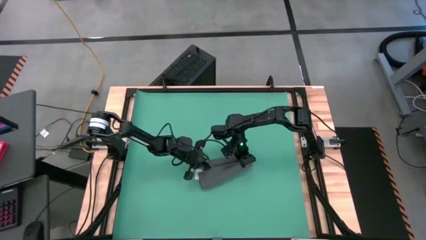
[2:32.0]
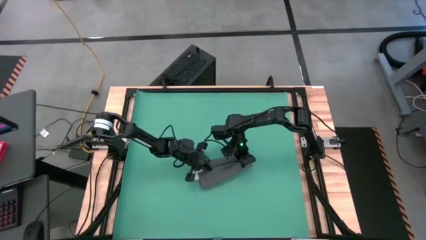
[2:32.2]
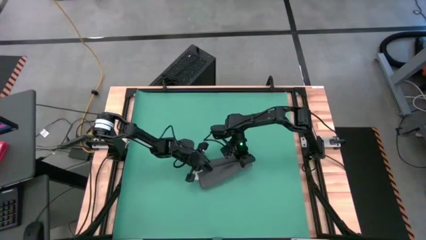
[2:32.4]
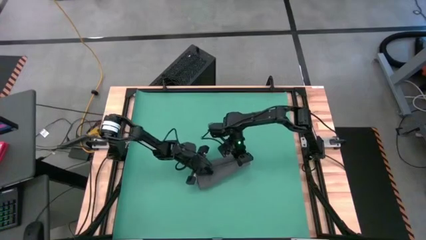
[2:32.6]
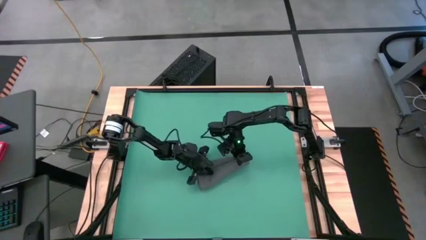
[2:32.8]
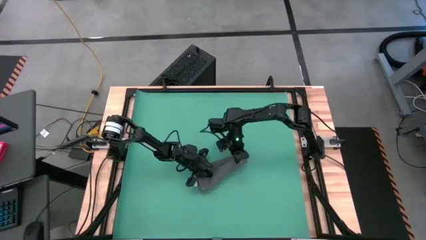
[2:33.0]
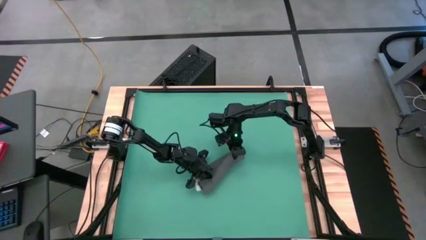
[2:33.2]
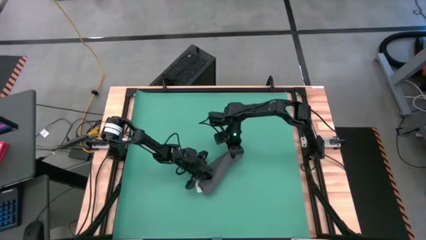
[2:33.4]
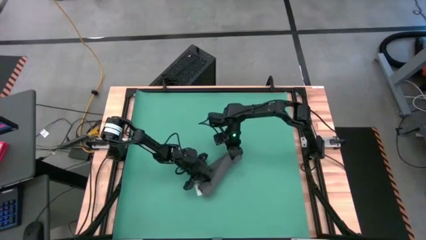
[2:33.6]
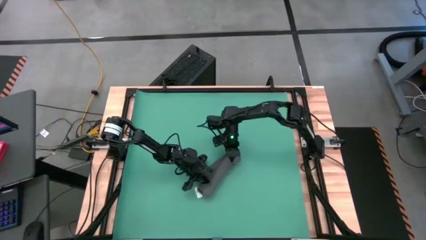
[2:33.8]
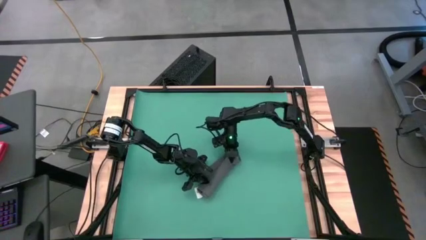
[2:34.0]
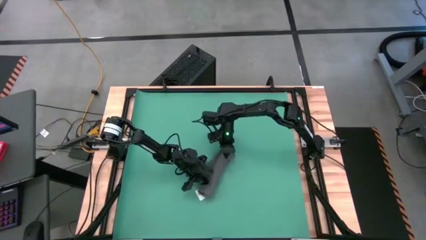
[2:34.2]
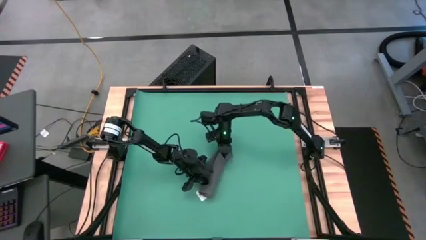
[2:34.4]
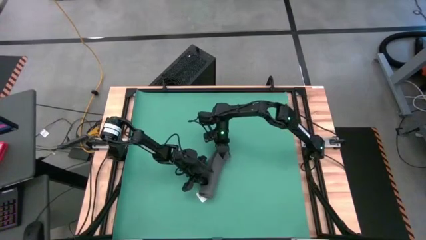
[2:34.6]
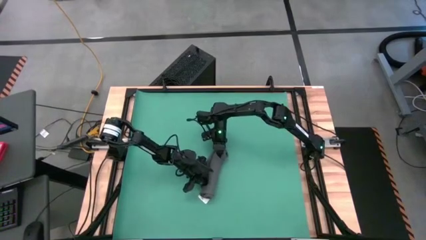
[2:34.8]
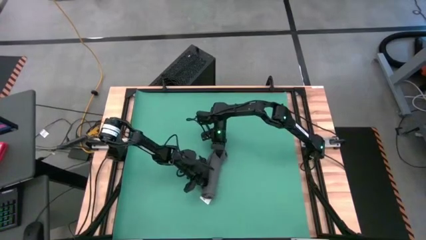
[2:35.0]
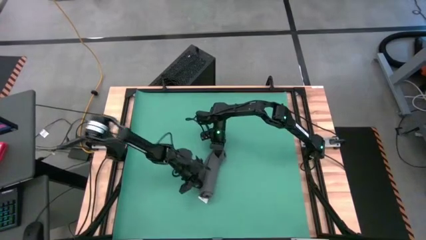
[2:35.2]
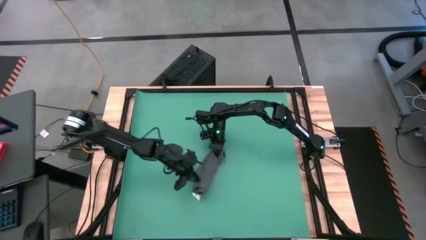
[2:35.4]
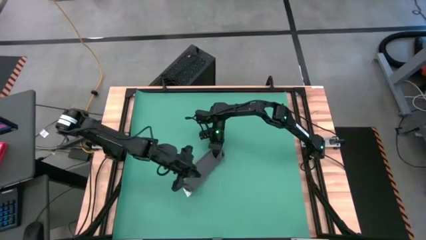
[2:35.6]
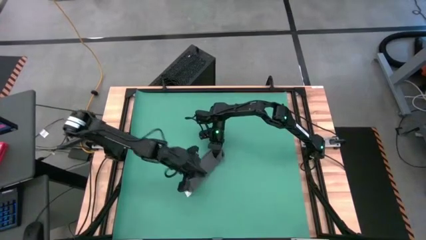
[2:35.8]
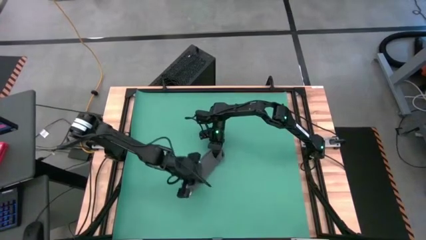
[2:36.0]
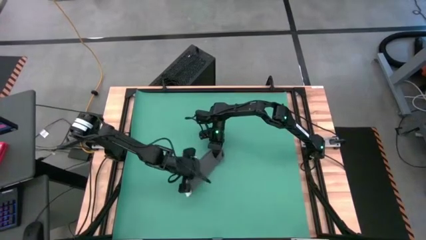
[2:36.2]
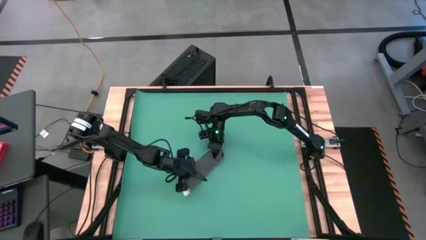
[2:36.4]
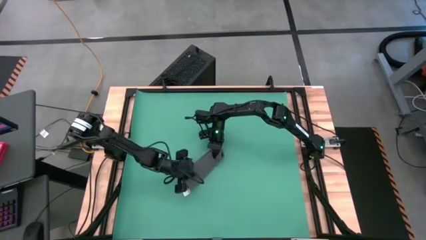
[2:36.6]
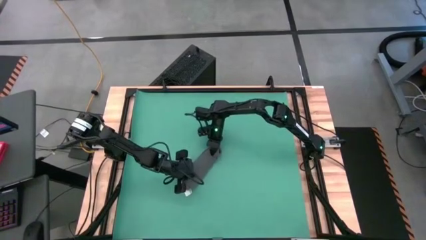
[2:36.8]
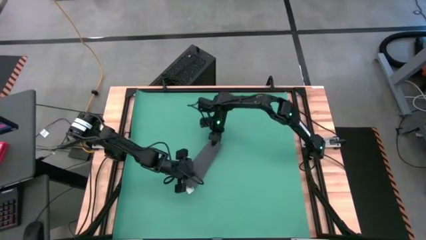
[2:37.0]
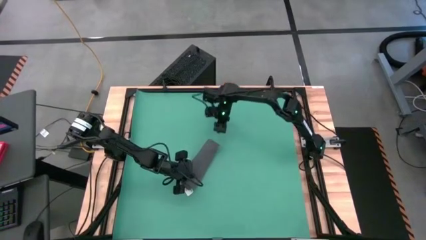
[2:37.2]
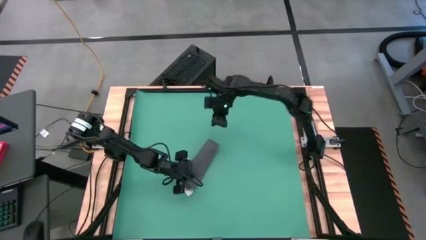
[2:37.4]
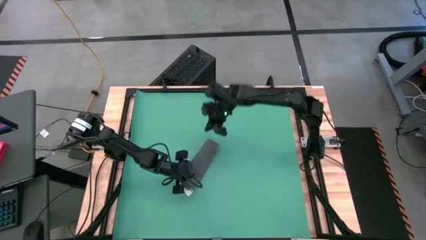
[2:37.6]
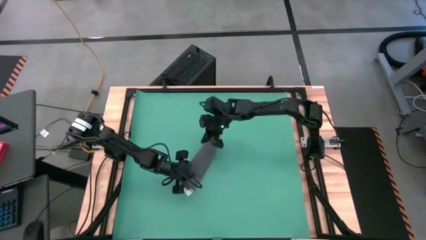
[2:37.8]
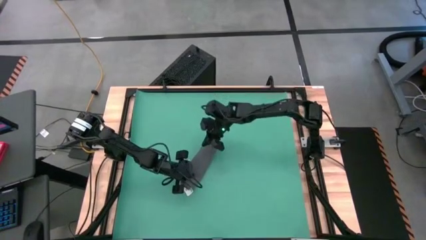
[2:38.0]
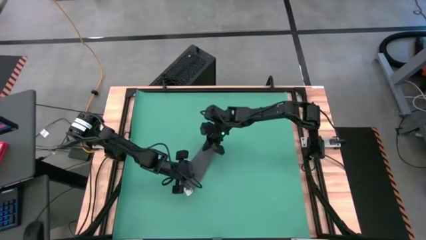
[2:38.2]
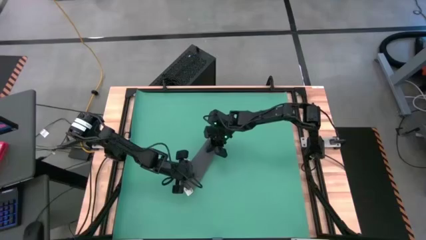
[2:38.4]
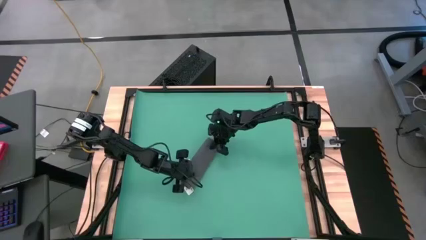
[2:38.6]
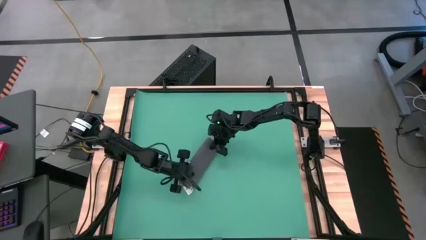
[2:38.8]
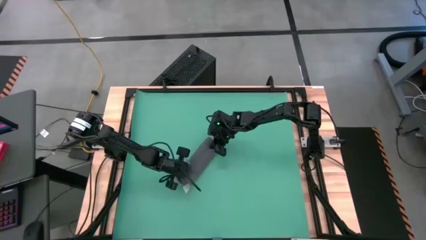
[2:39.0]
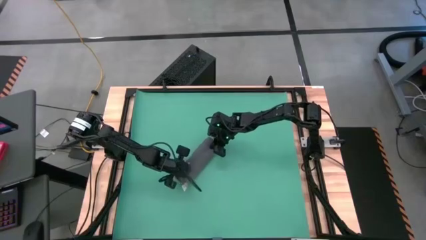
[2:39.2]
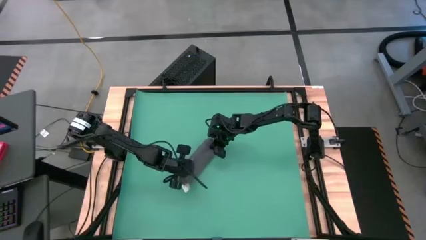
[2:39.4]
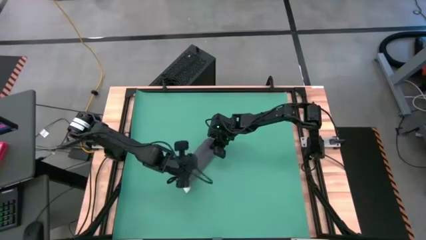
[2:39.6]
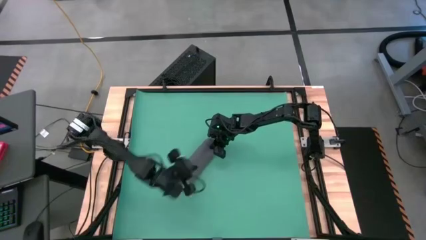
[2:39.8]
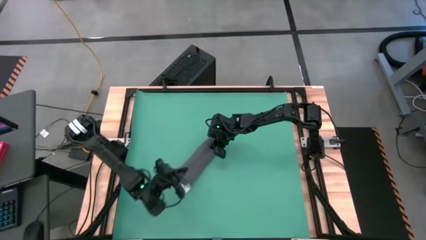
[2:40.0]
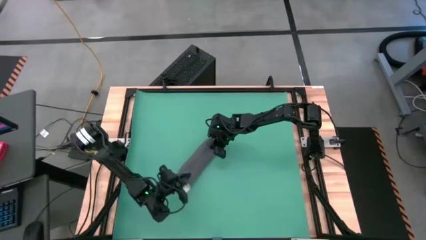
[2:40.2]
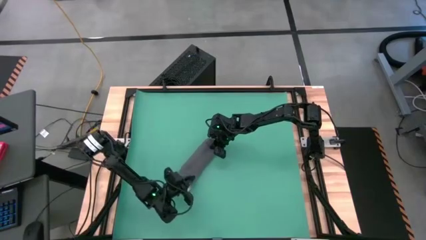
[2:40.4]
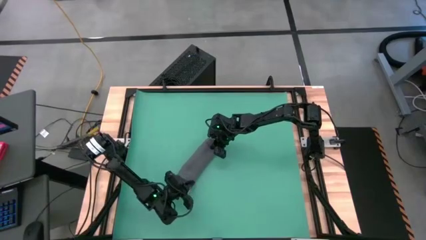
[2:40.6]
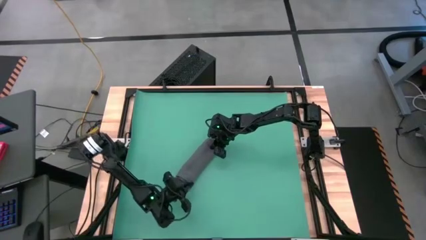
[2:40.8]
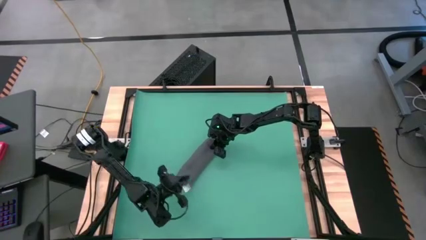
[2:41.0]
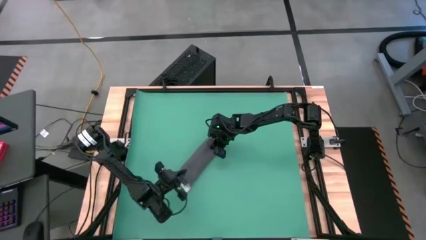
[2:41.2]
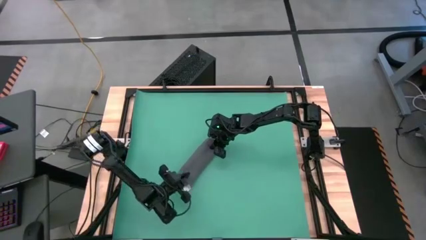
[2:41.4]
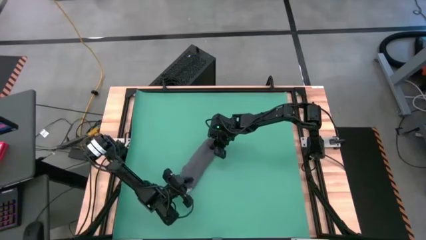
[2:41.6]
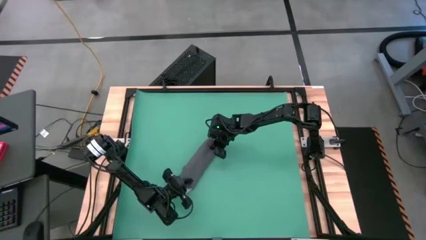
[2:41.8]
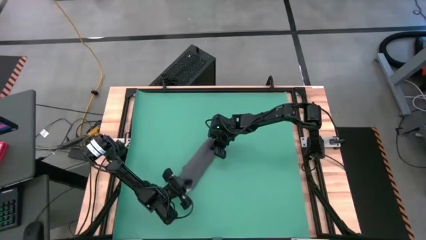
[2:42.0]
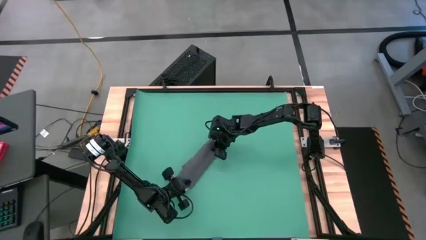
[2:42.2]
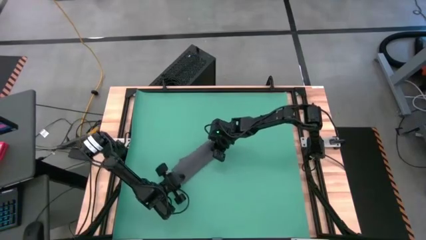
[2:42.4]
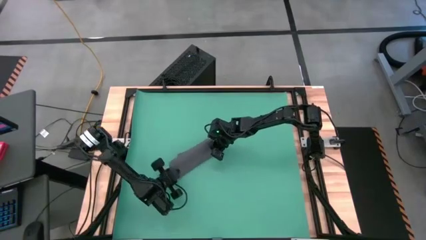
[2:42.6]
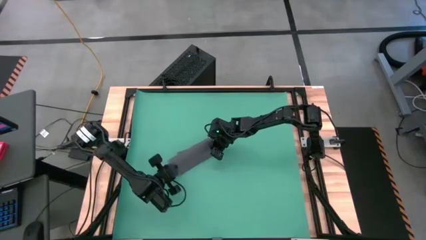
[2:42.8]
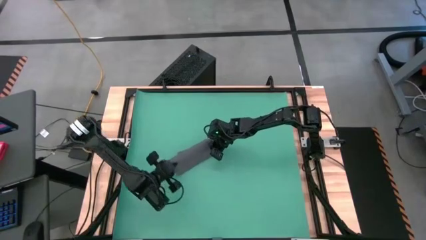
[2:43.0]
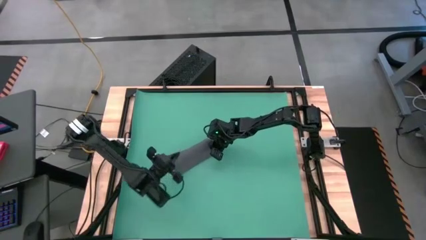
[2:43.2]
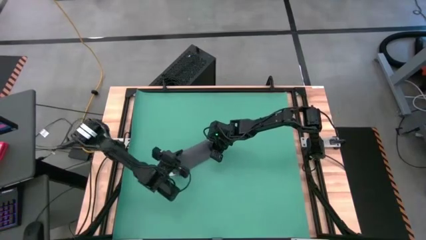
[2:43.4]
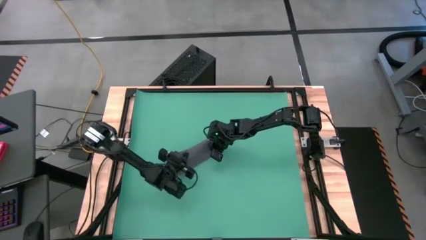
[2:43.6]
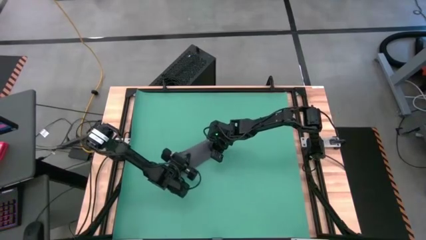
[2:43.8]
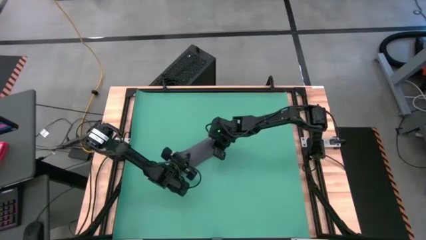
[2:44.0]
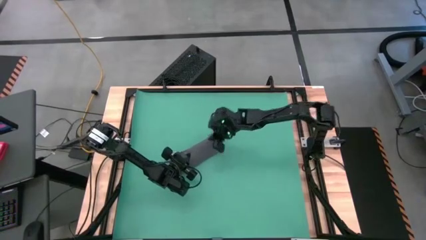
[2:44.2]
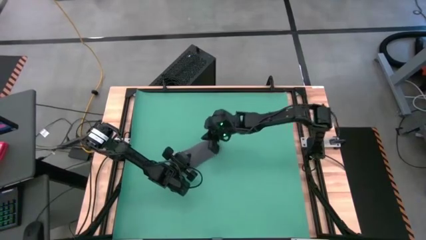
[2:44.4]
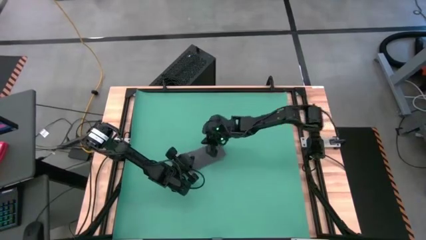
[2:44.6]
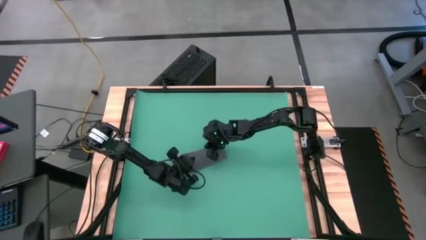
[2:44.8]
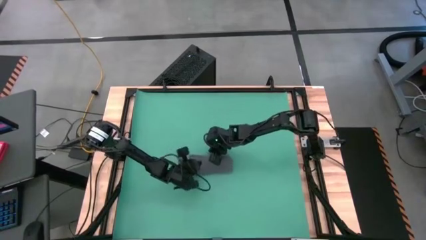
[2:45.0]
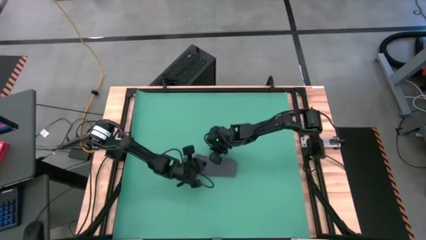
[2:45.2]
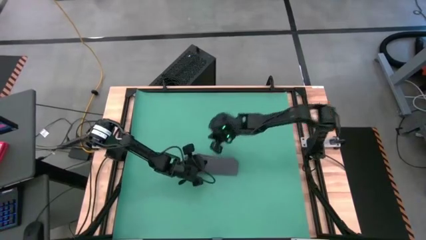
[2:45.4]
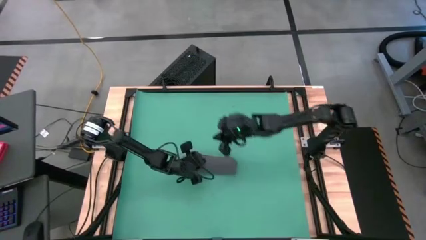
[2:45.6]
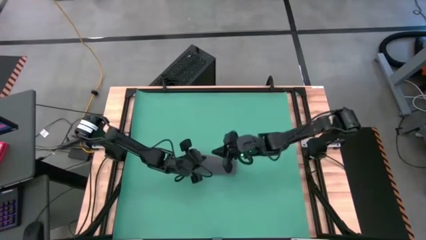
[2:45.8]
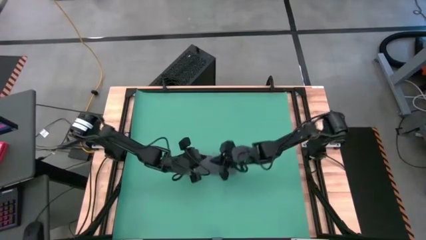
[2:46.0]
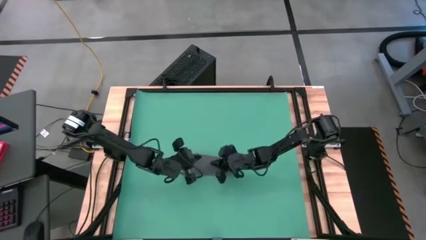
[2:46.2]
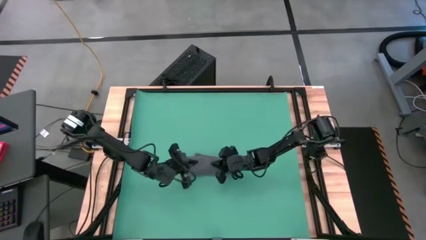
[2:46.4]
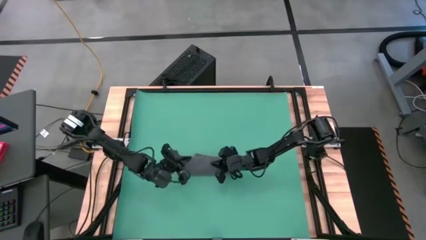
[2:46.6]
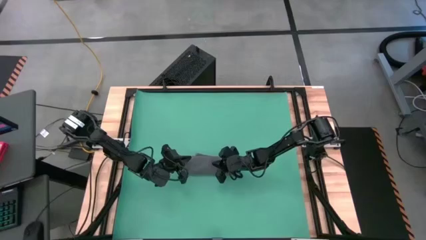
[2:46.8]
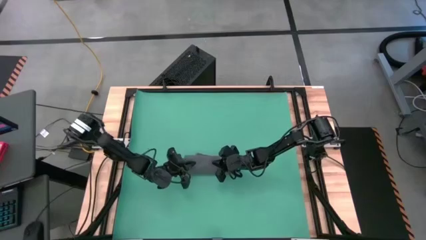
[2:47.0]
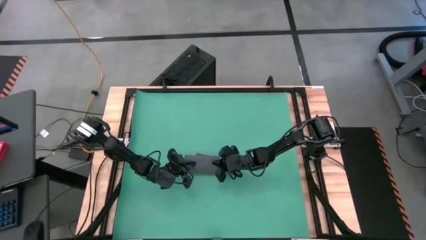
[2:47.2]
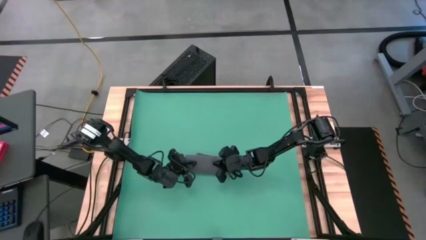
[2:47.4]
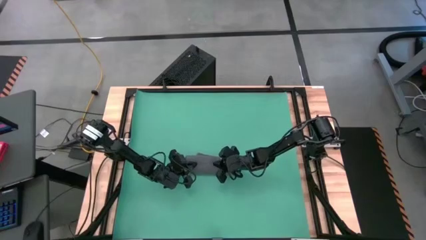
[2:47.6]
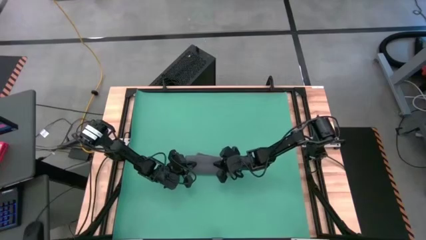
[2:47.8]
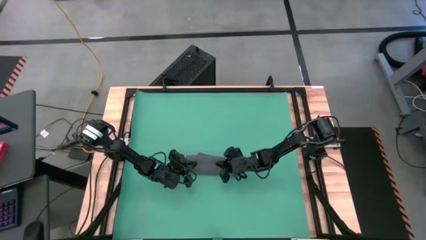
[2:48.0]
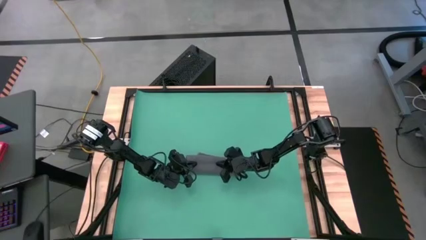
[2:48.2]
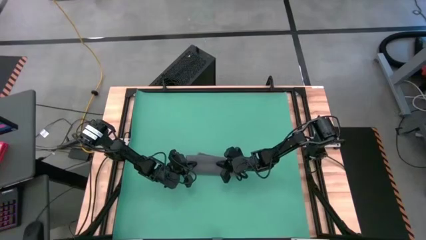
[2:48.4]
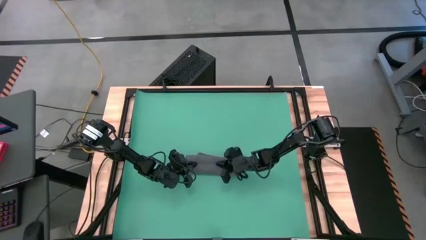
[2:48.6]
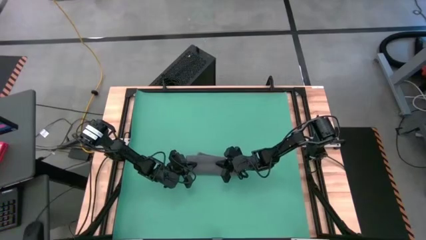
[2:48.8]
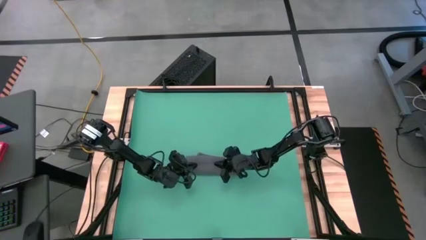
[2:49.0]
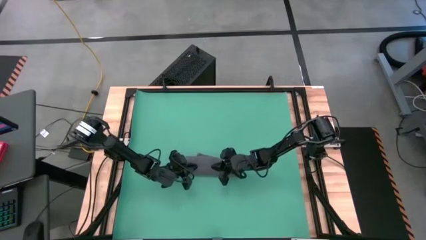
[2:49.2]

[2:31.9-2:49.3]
Task: Roll towel
Roll the gray towel on the table
